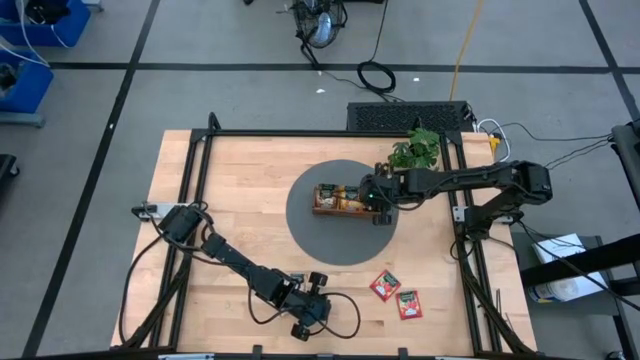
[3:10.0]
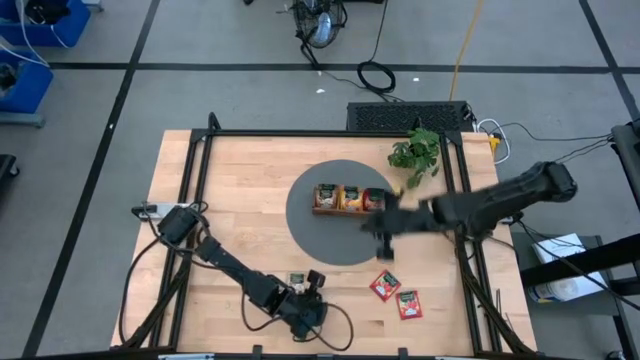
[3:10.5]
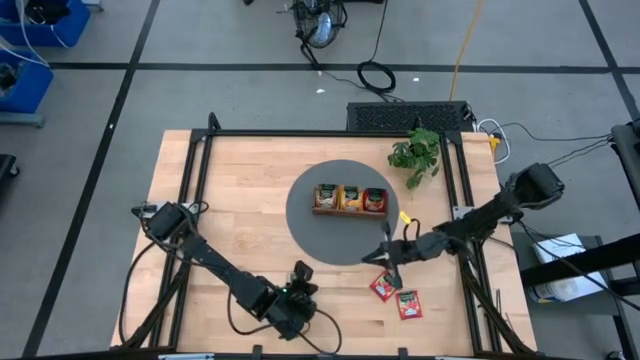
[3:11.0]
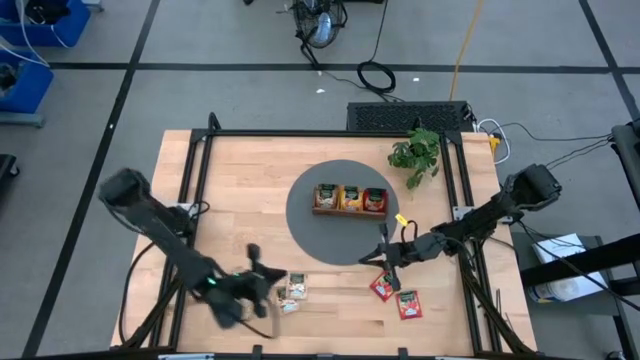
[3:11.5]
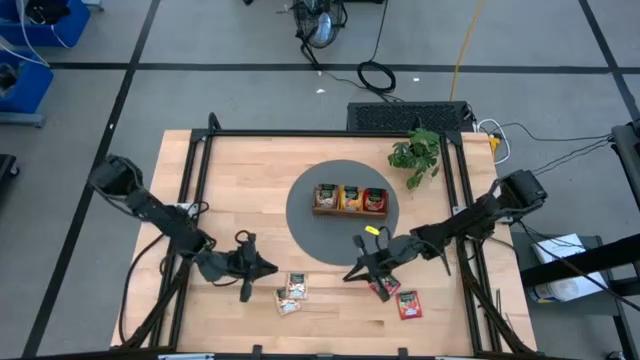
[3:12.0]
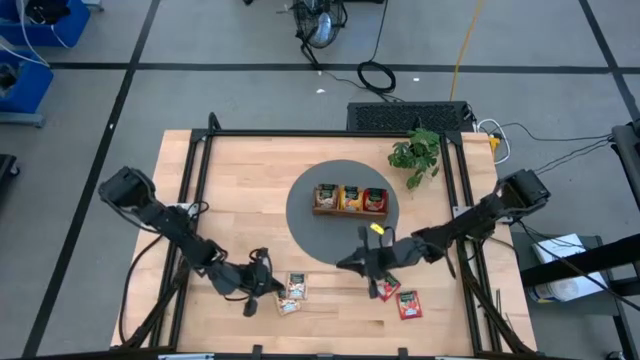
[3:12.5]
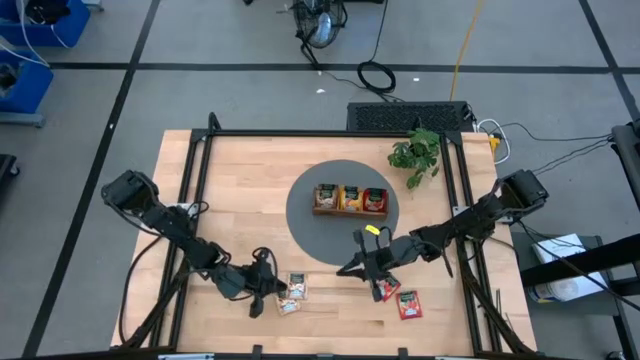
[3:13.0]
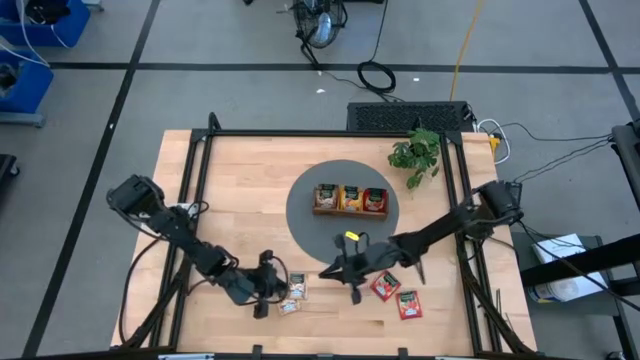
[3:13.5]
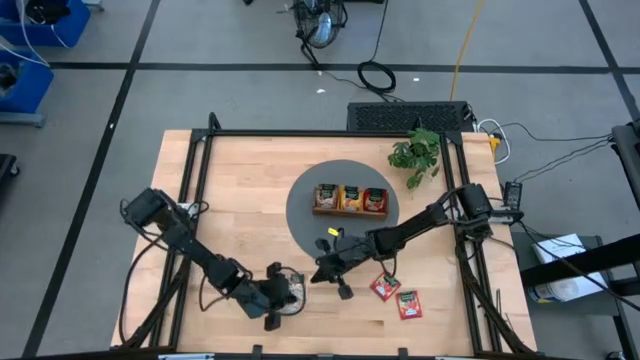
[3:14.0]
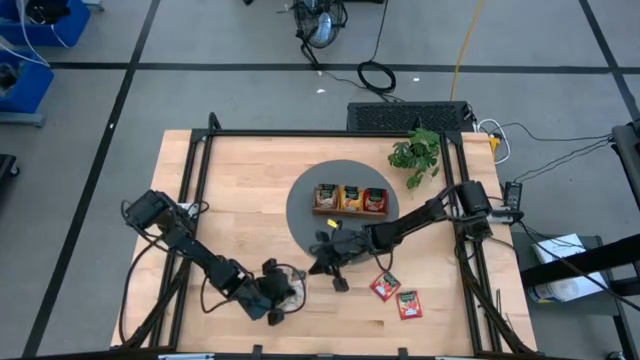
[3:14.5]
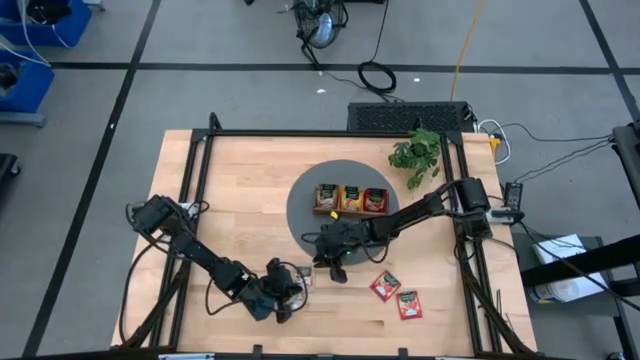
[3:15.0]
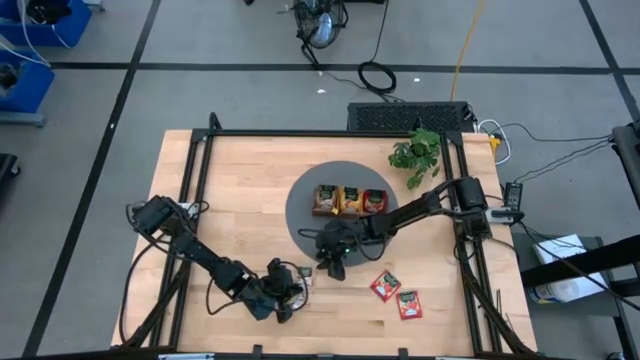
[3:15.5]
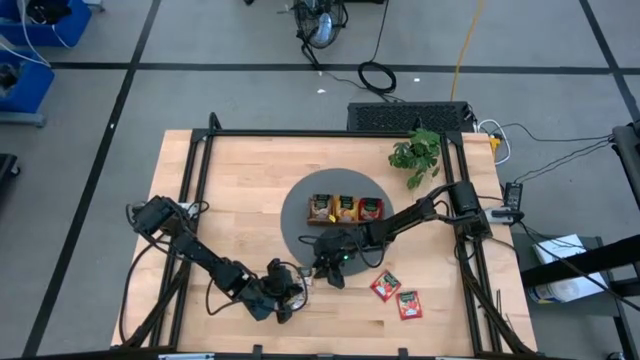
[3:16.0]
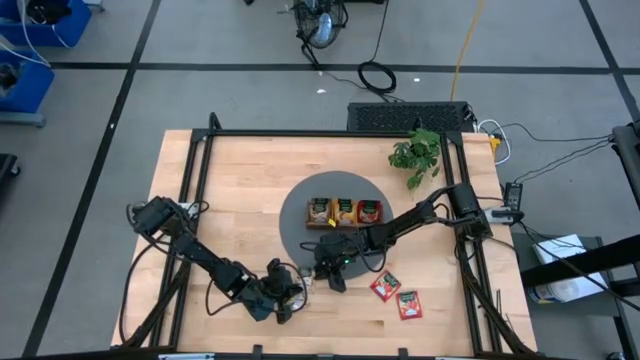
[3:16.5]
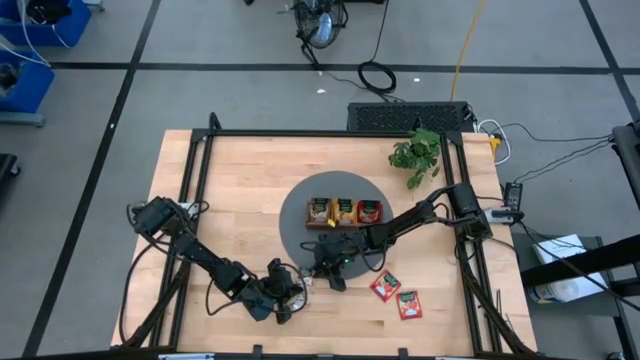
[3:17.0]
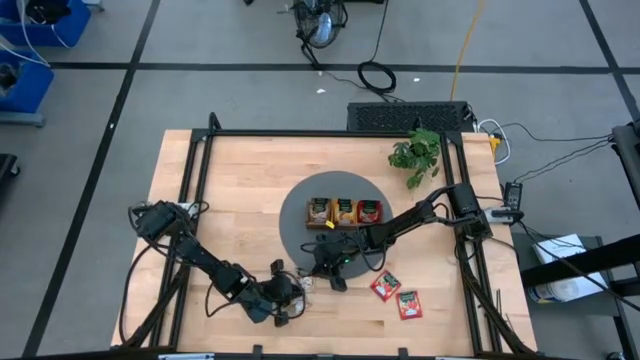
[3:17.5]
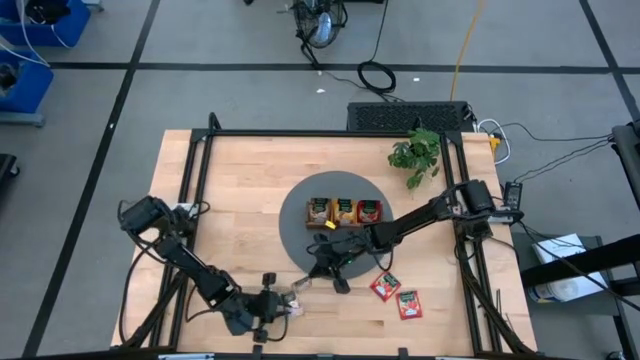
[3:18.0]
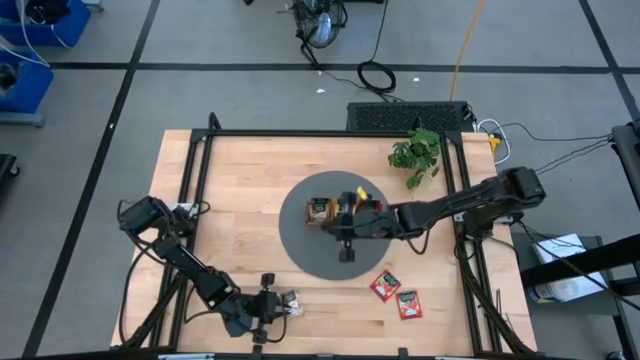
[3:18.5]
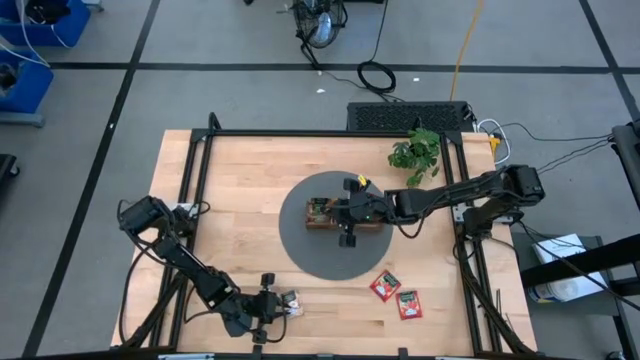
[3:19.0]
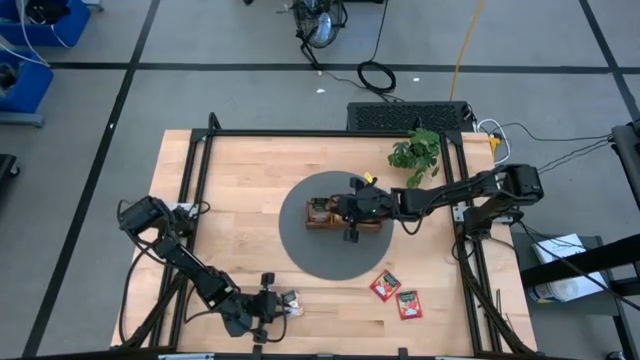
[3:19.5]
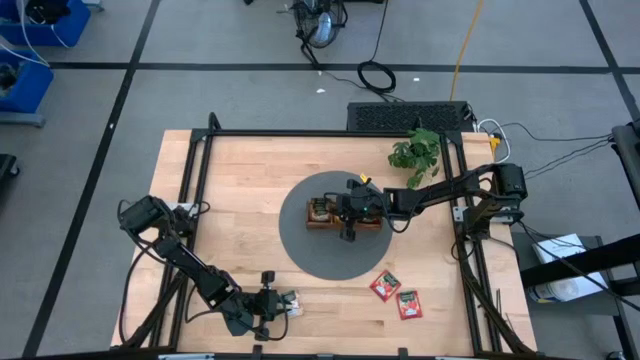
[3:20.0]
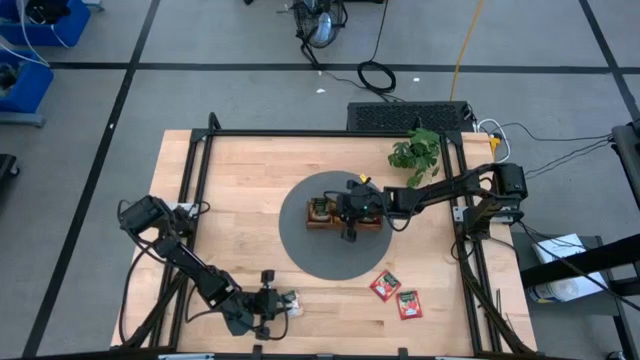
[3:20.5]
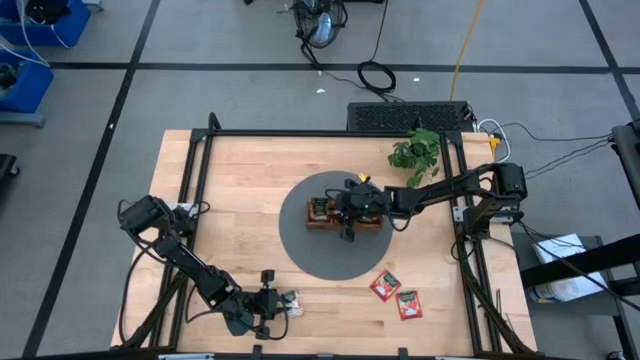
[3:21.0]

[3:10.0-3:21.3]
Task: Pick & Place Tea
Put the brown tea bag to the left section into the wooden organizer

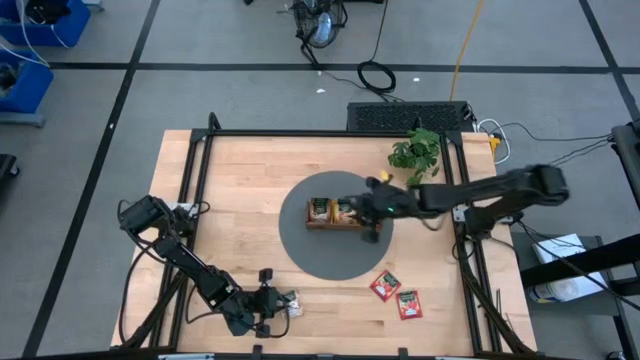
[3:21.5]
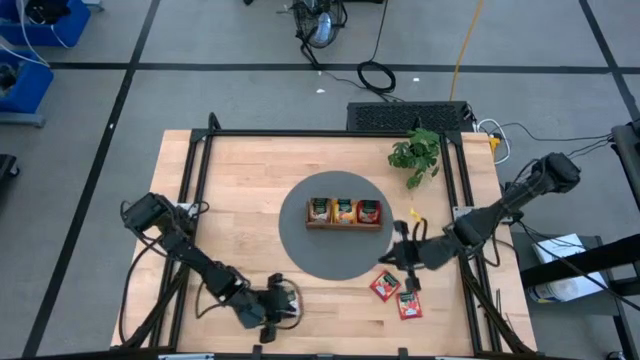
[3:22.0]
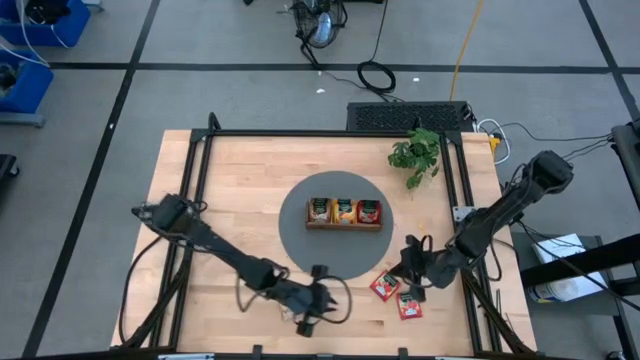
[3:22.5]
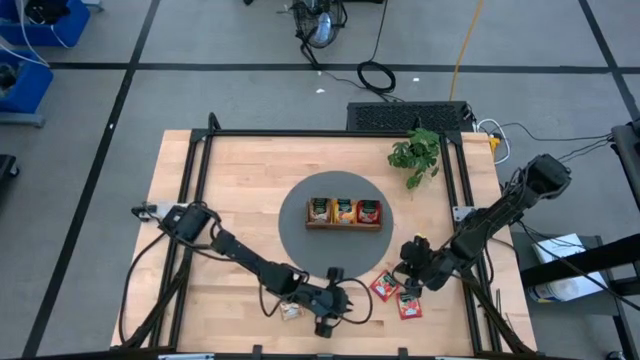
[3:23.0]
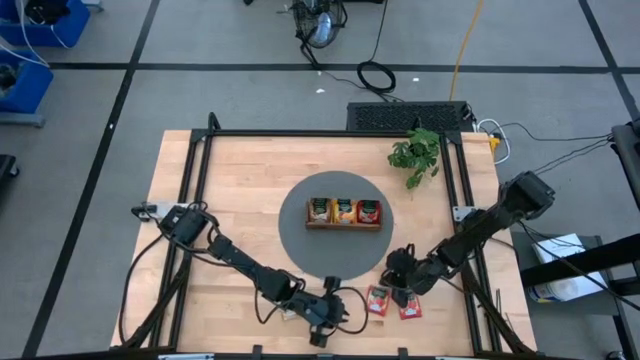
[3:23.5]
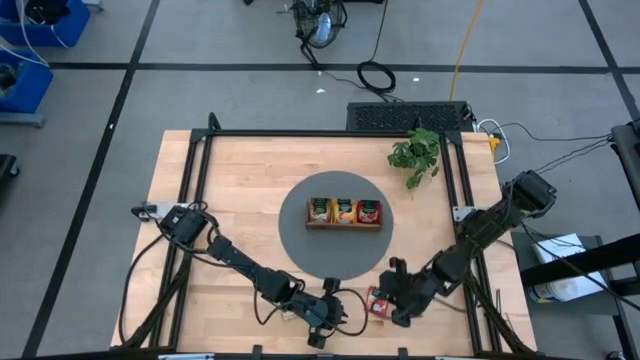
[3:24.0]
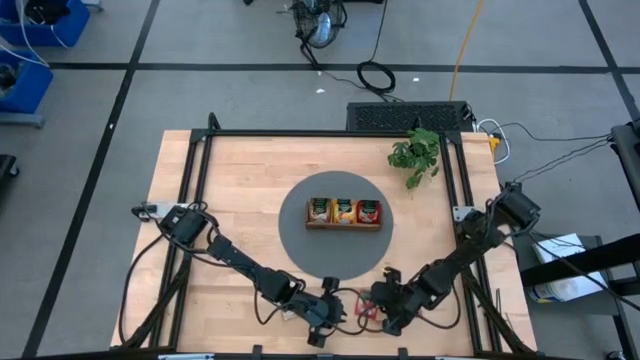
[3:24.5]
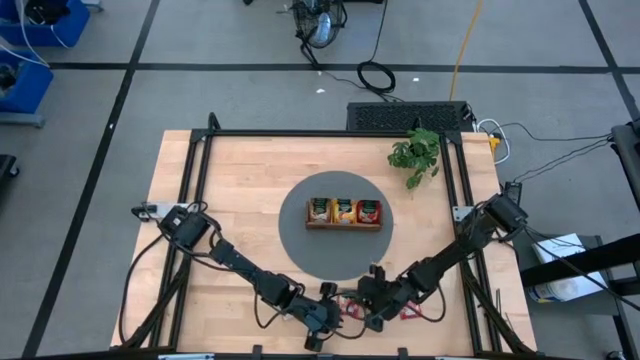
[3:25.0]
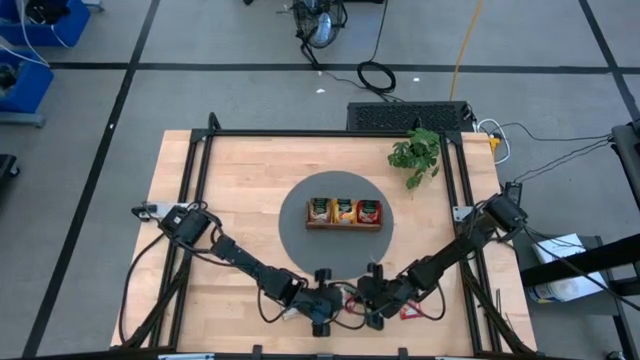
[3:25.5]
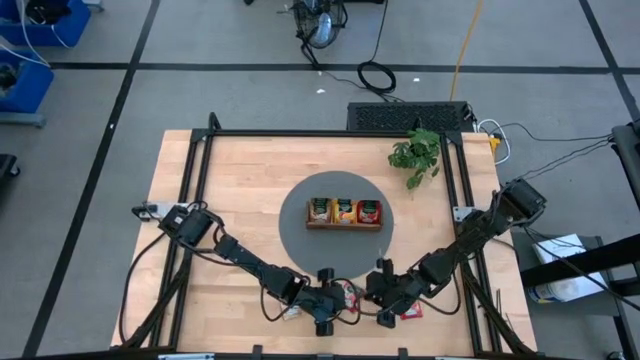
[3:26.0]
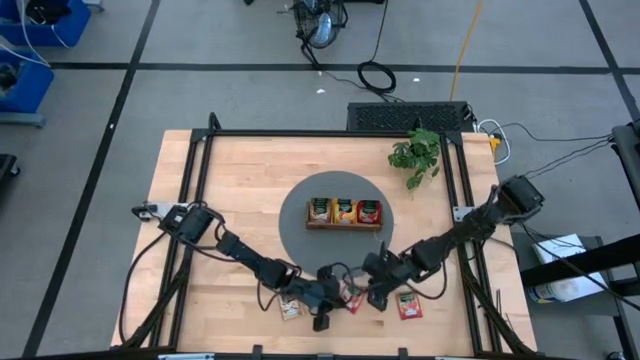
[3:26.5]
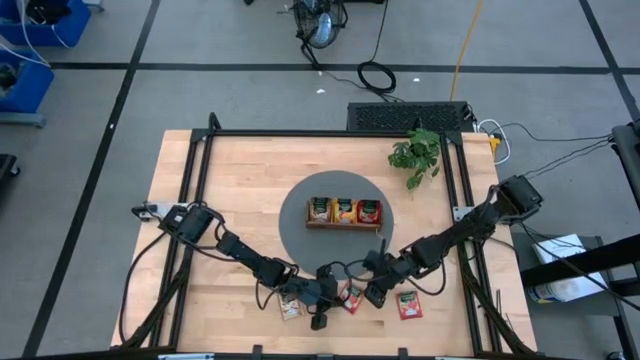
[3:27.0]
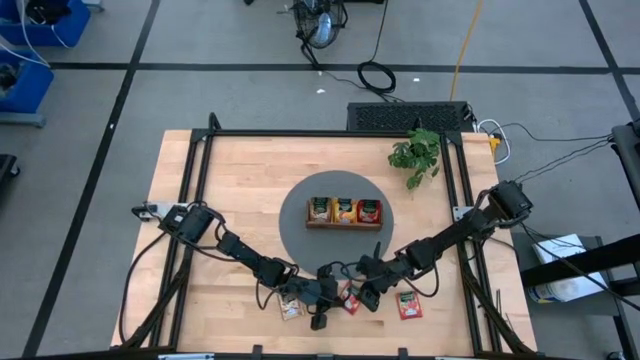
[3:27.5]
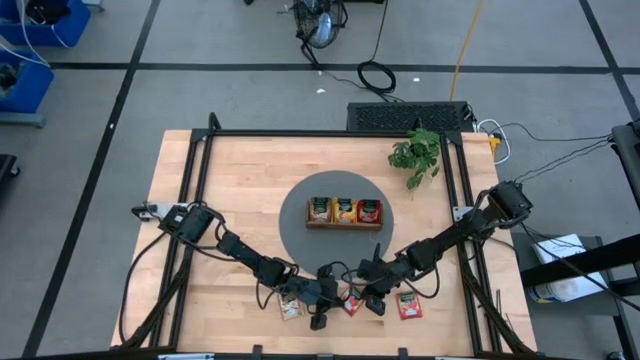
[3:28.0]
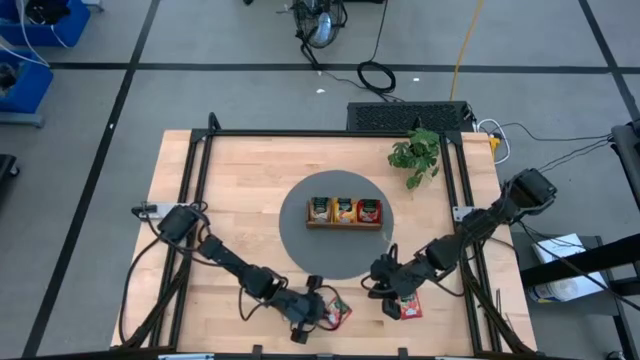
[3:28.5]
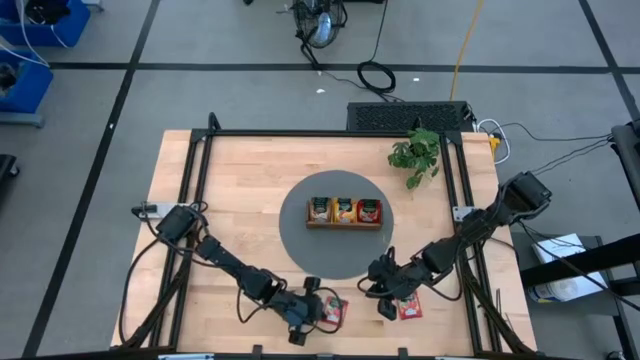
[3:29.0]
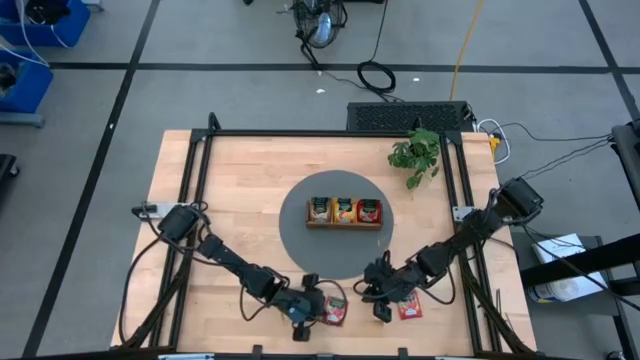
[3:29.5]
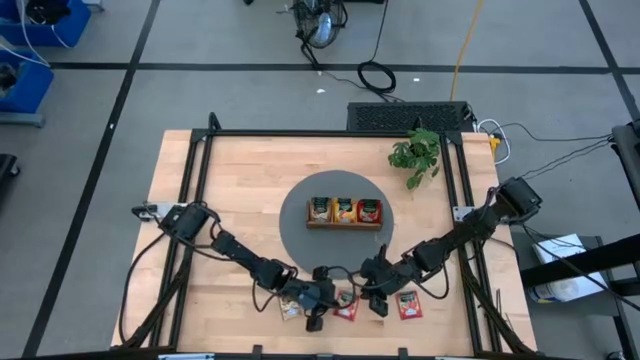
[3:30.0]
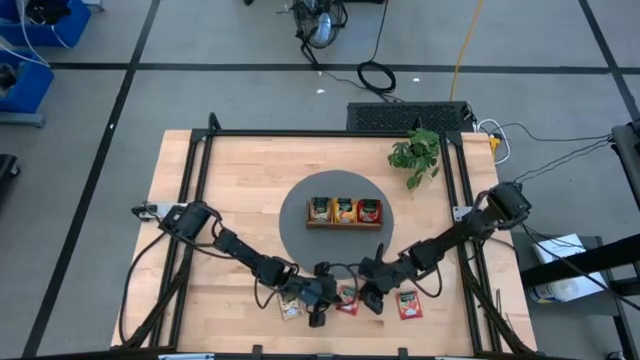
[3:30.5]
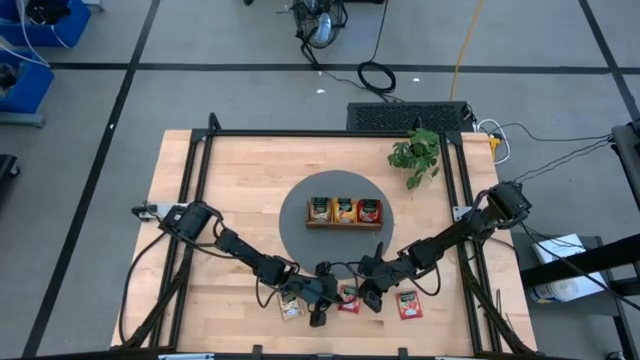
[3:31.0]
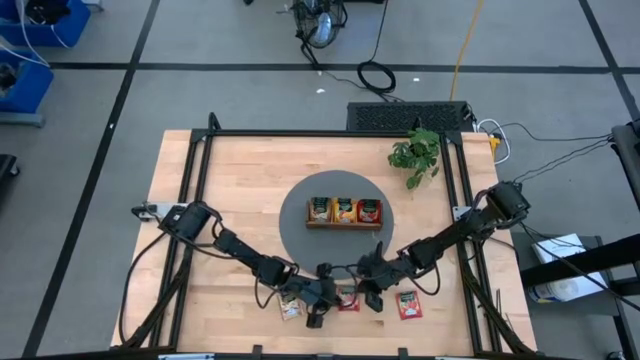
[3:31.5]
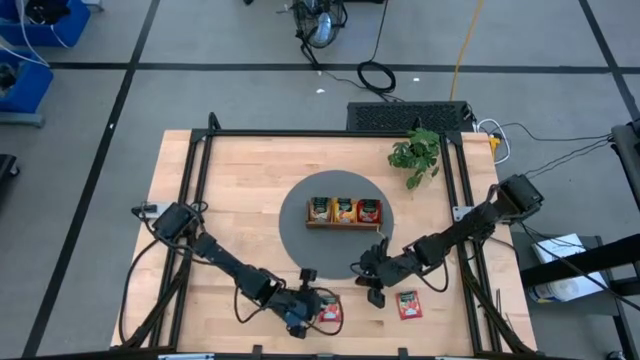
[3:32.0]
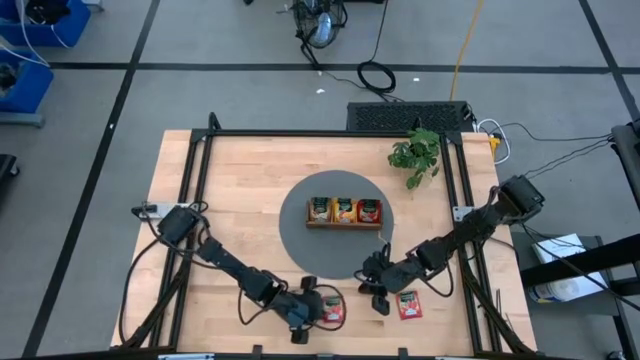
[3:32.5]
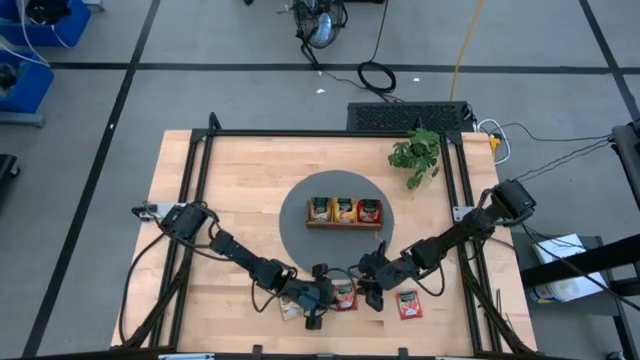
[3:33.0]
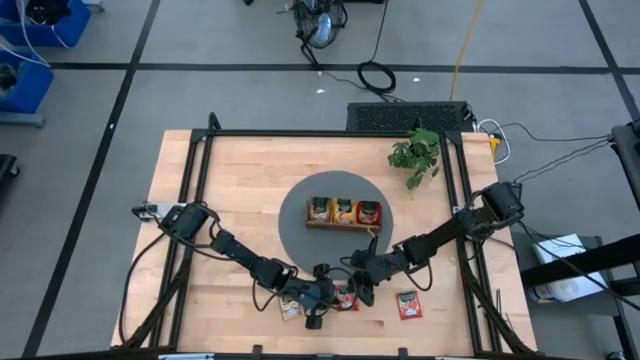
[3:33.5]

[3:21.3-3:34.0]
Put the red tea bag to the right section into the wooden organizer
